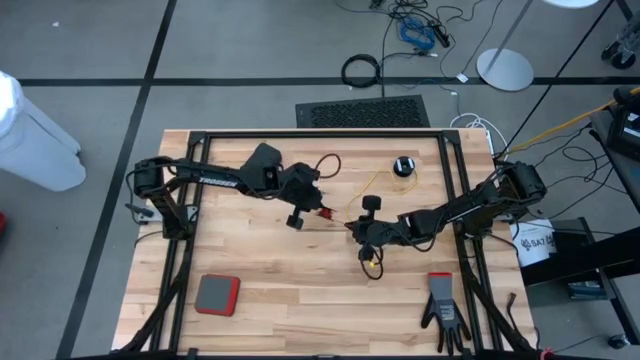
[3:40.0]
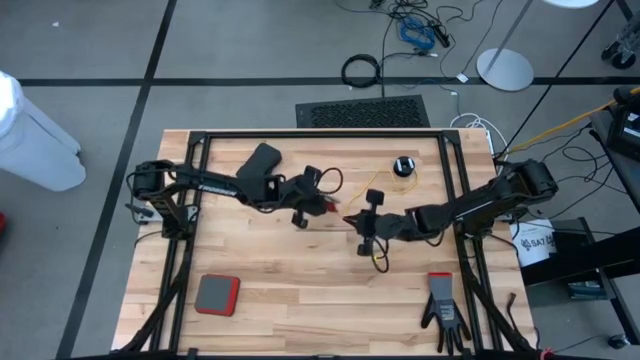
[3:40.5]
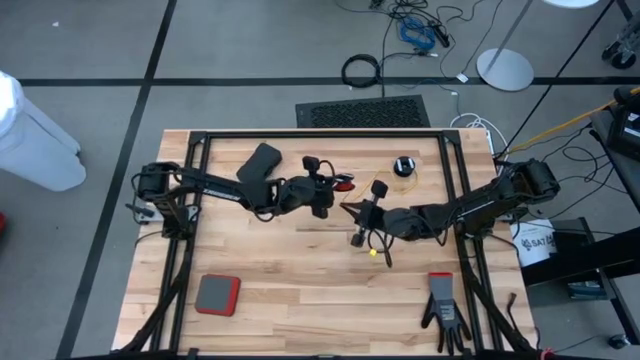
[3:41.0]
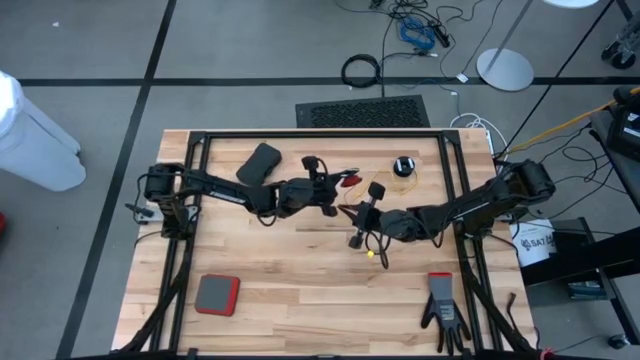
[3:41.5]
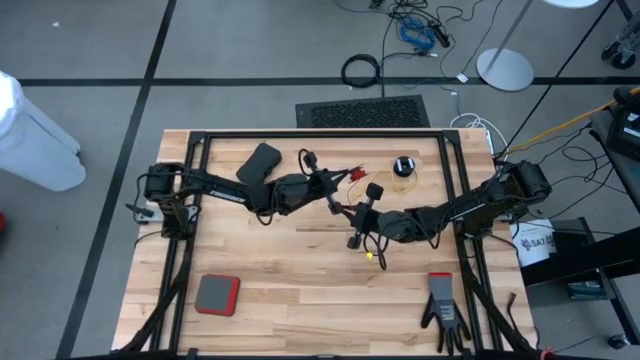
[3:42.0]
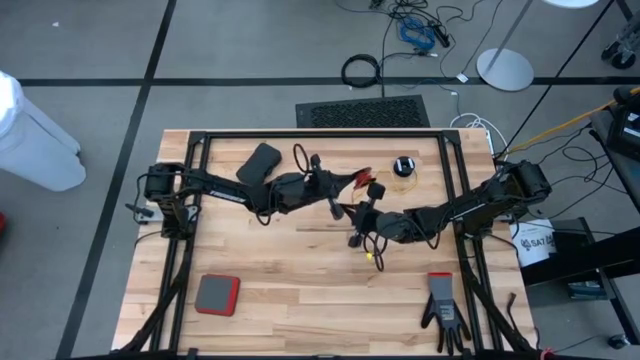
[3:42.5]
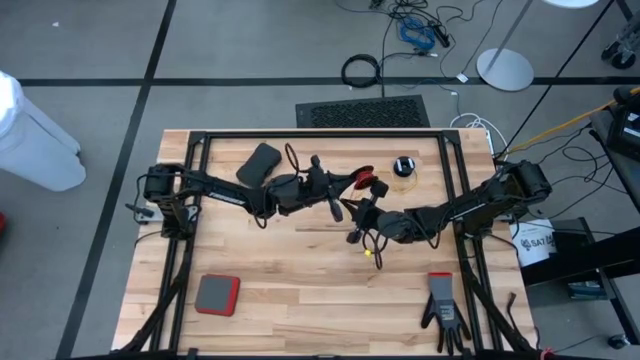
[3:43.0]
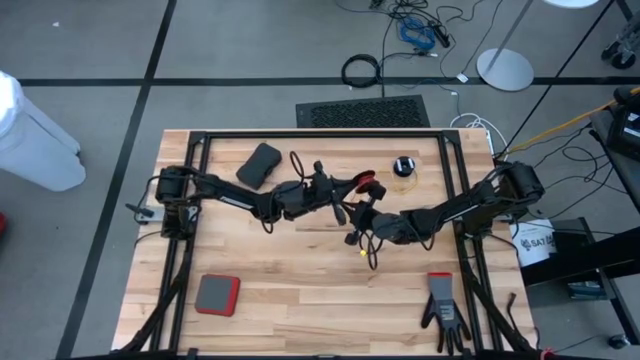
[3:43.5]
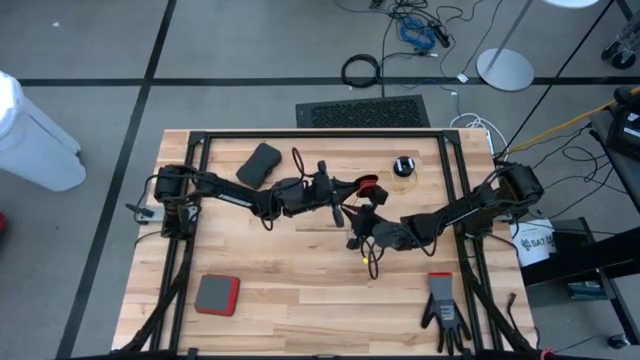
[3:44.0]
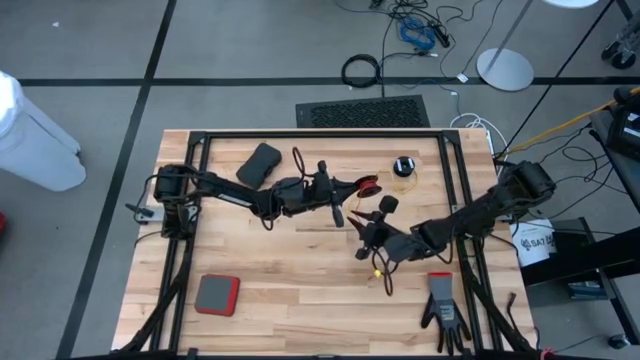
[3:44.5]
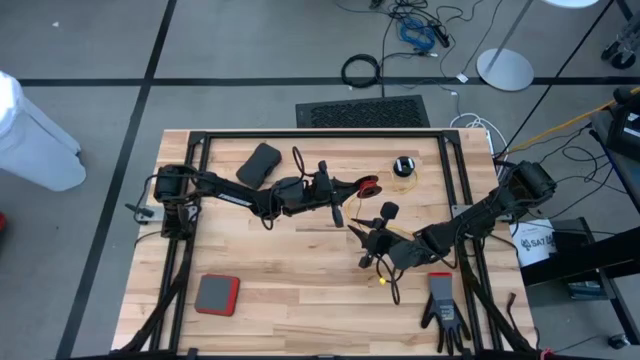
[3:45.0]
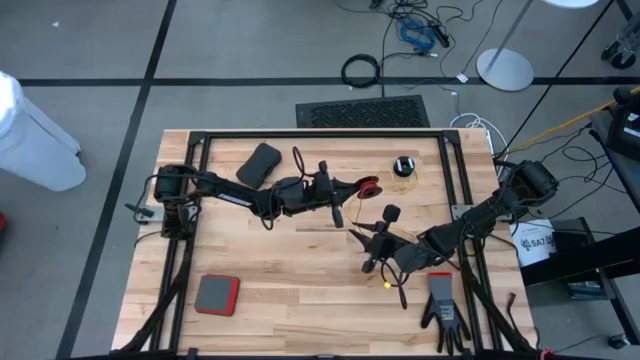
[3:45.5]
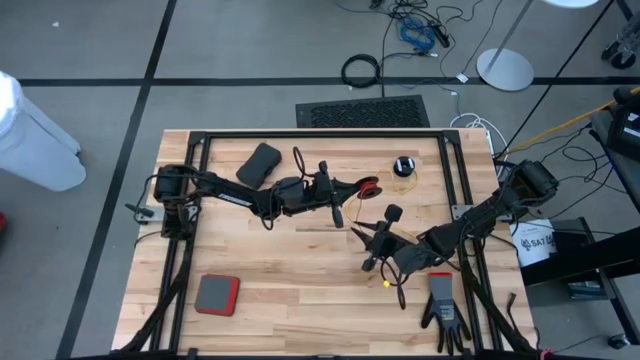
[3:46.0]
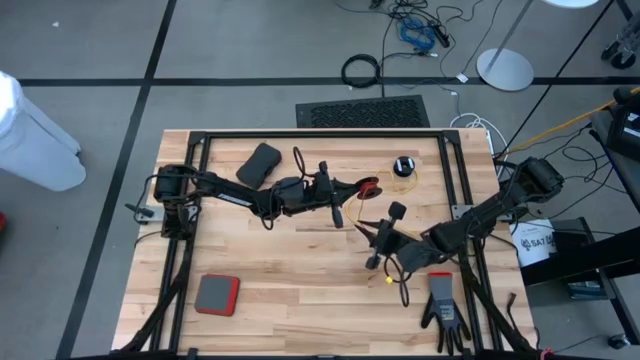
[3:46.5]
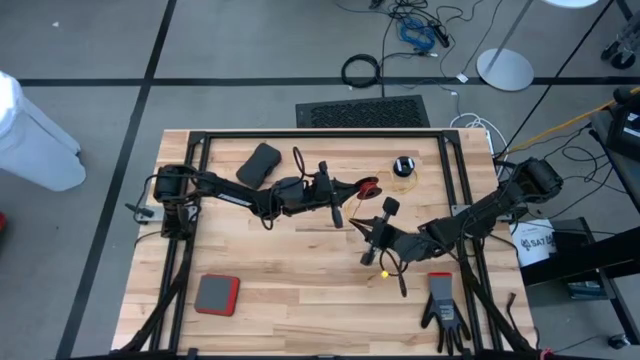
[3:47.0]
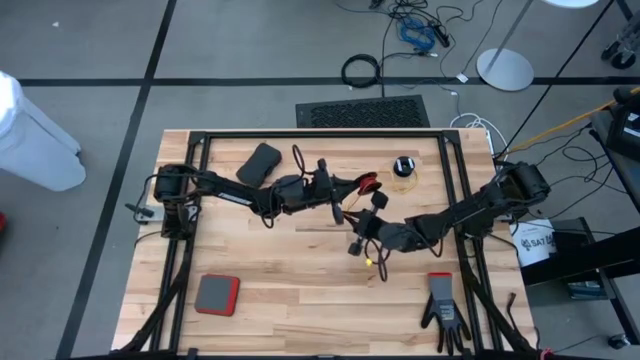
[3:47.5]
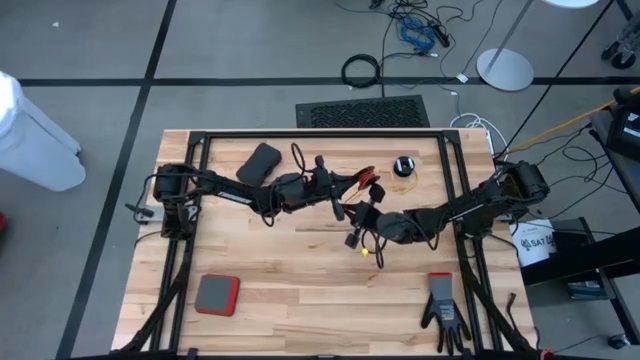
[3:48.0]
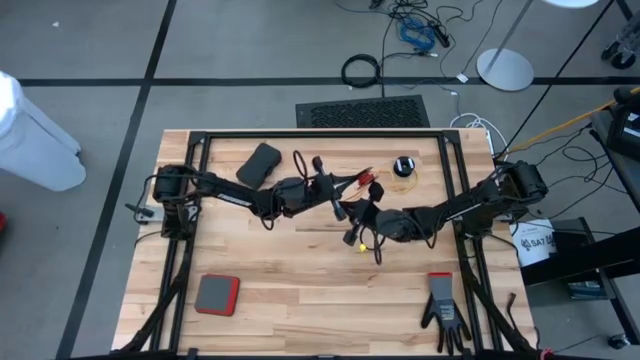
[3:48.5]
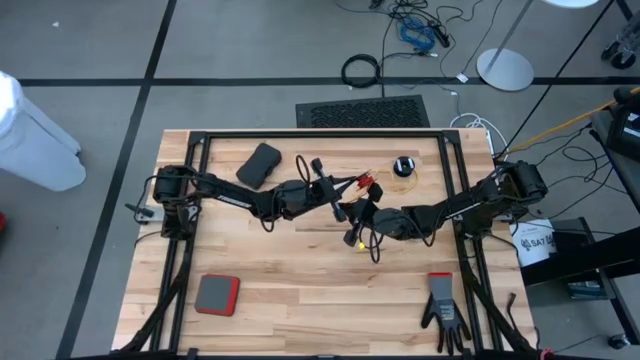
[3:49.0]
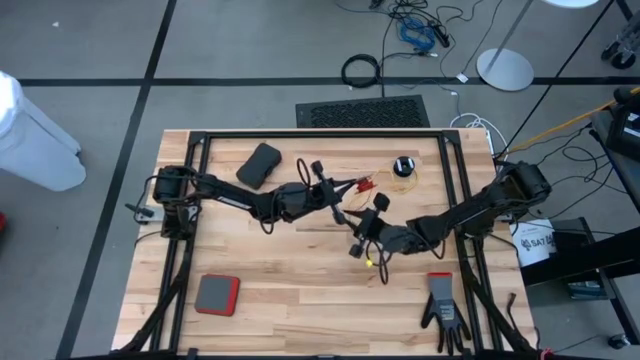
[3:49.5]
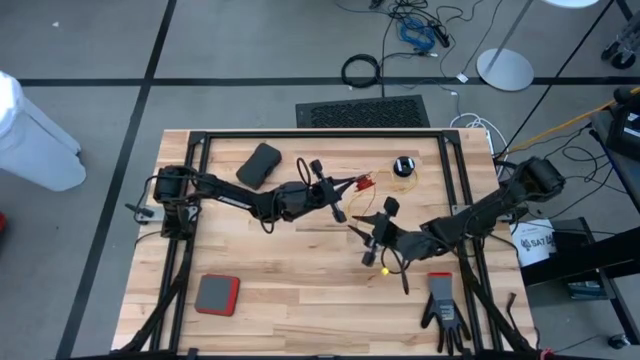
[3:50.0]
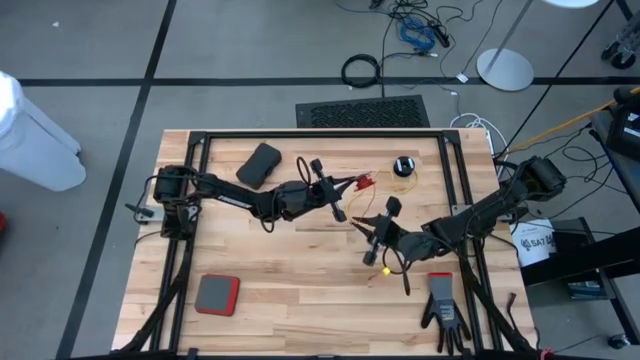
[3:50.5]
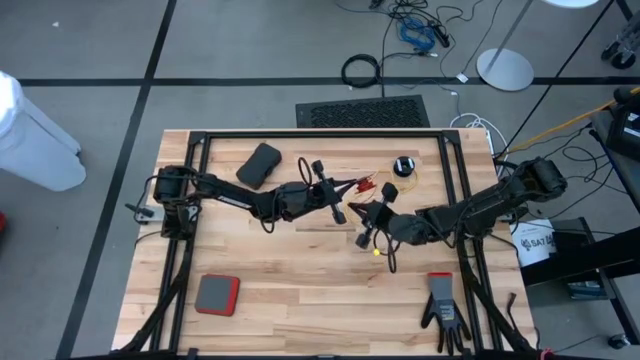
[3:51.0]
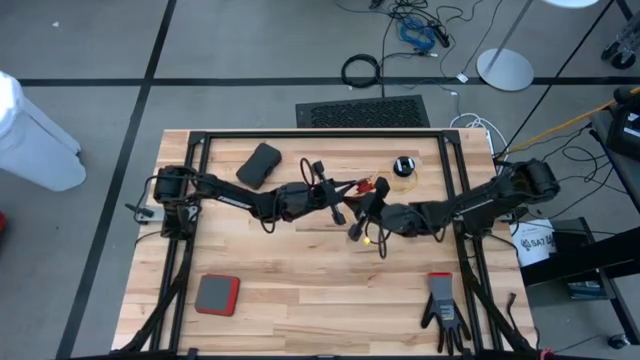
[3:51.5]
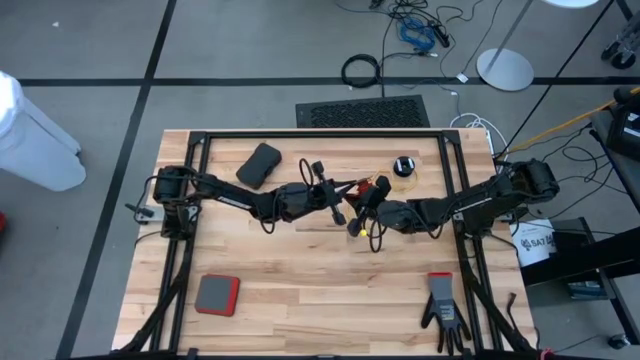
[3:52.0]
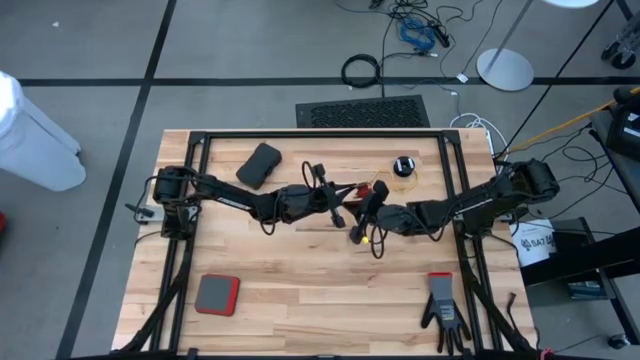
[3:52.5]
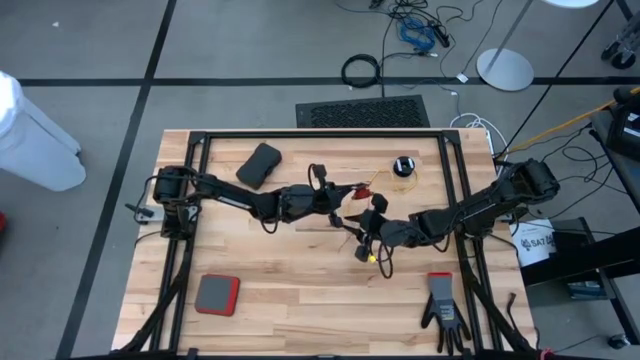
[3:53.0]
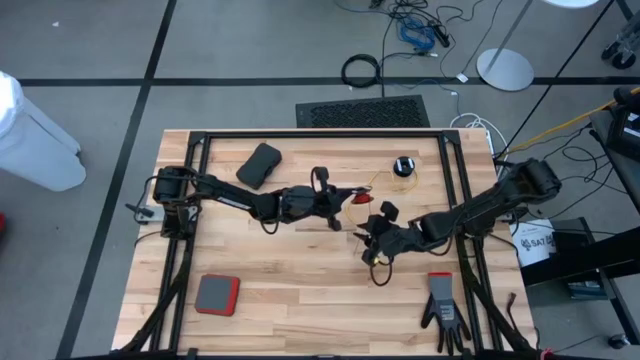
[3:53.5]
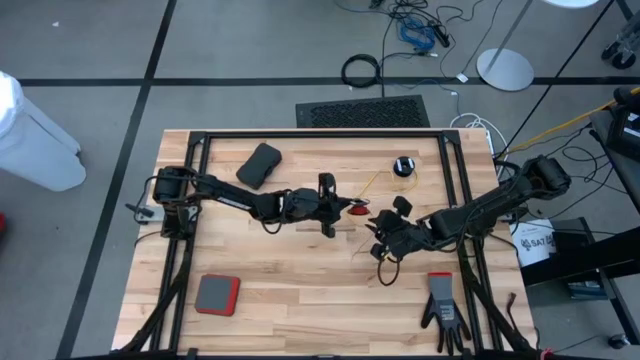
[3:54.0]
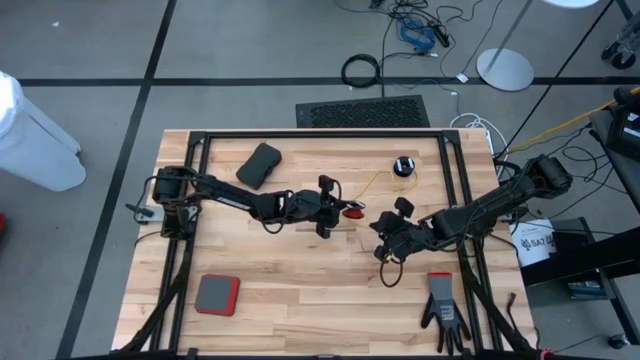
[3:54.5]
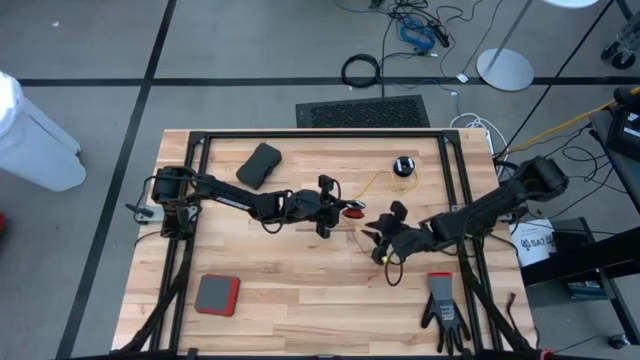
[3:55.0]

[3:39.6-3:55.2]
Task: Coil cords
Coil the red wire on the spool

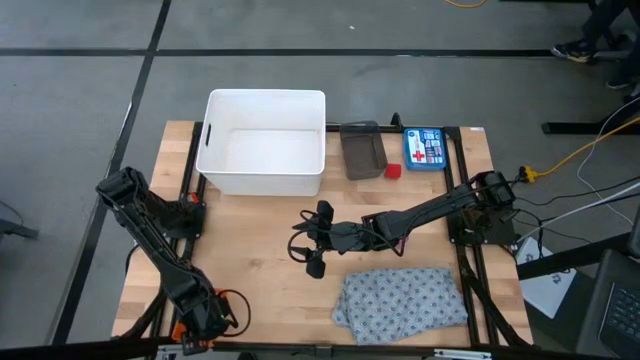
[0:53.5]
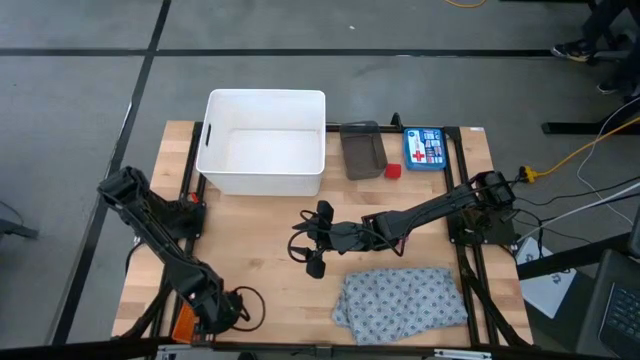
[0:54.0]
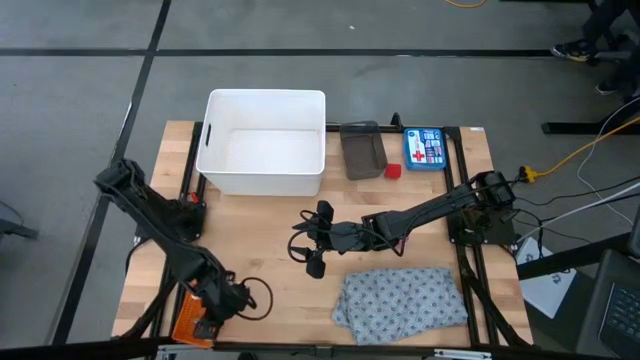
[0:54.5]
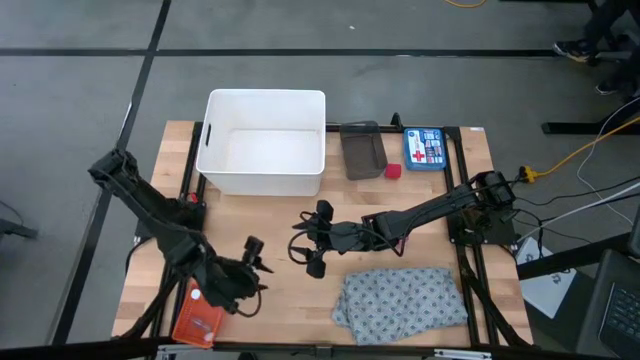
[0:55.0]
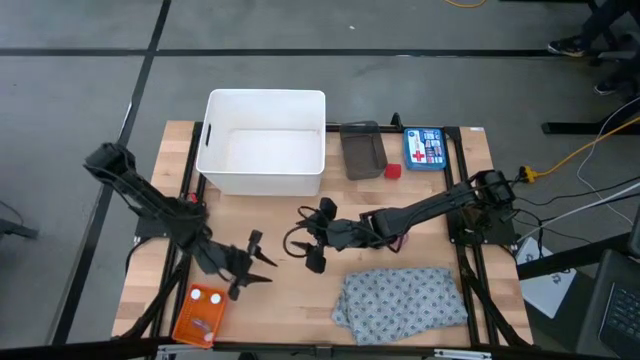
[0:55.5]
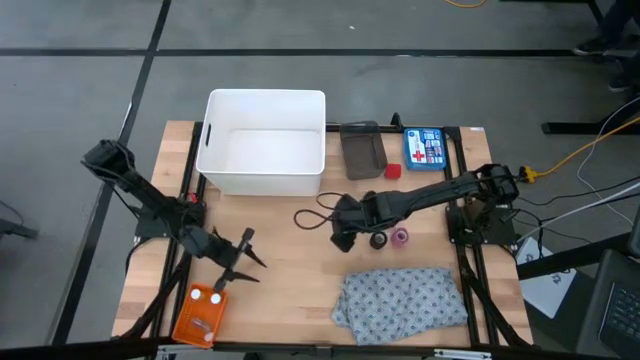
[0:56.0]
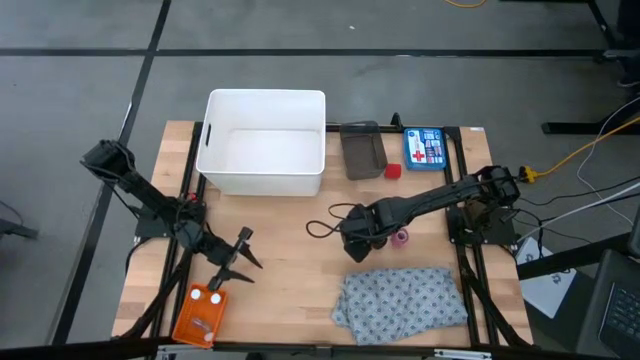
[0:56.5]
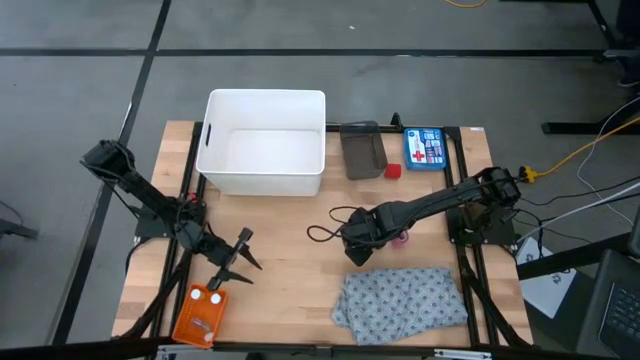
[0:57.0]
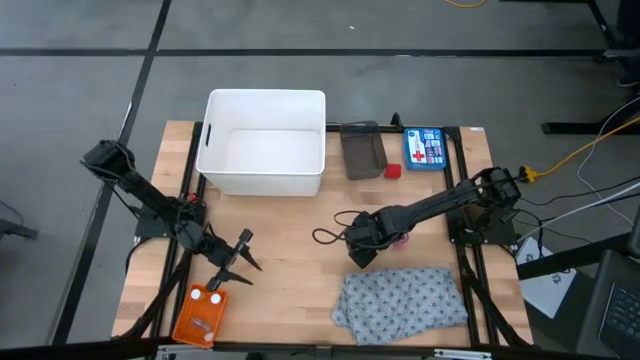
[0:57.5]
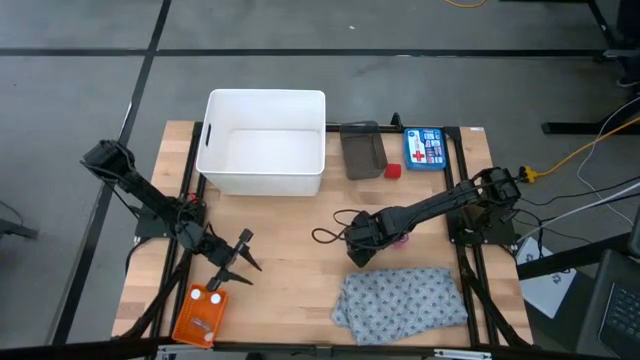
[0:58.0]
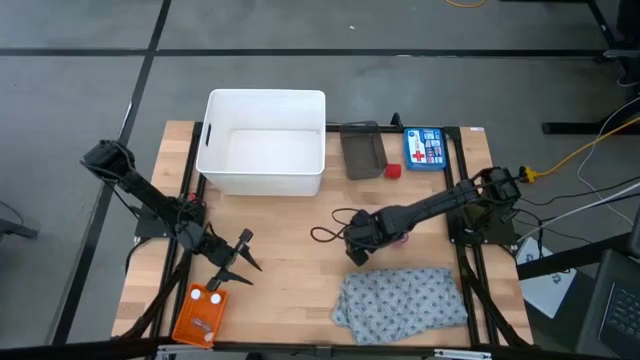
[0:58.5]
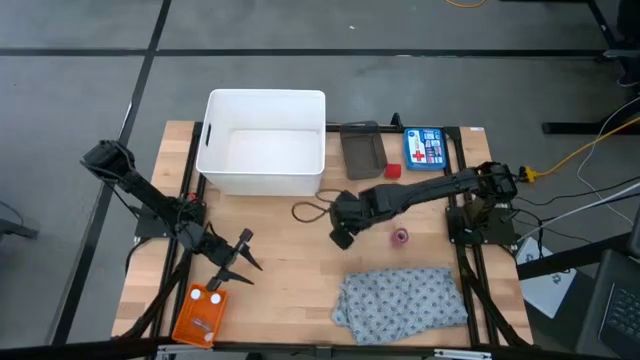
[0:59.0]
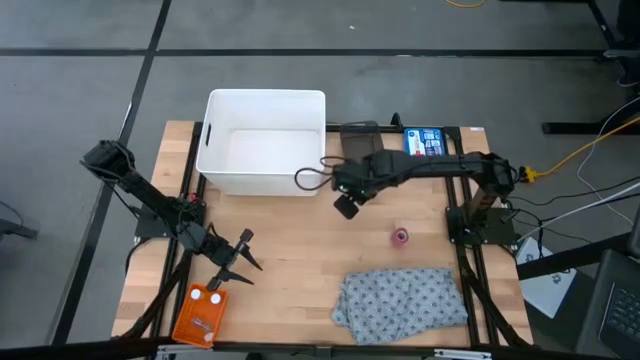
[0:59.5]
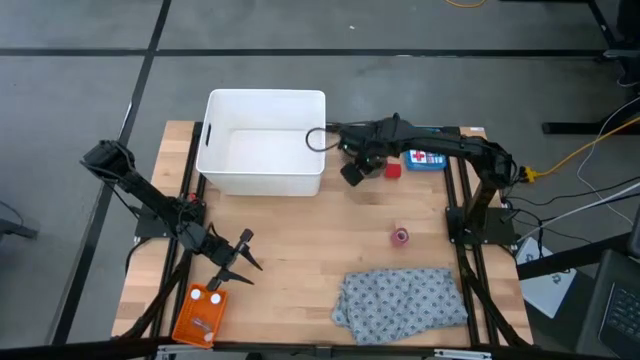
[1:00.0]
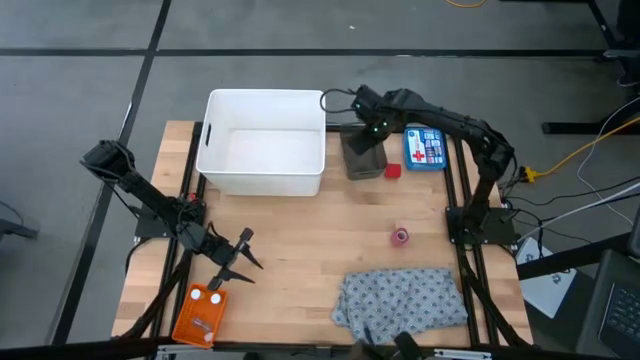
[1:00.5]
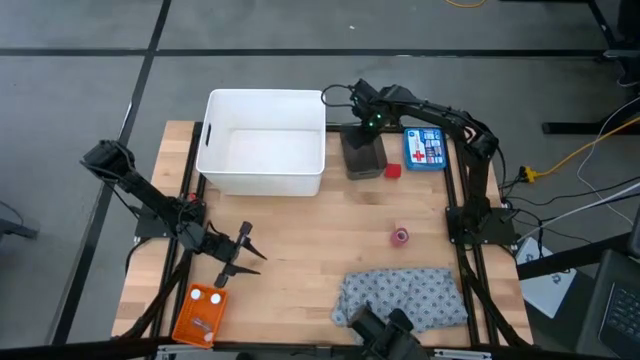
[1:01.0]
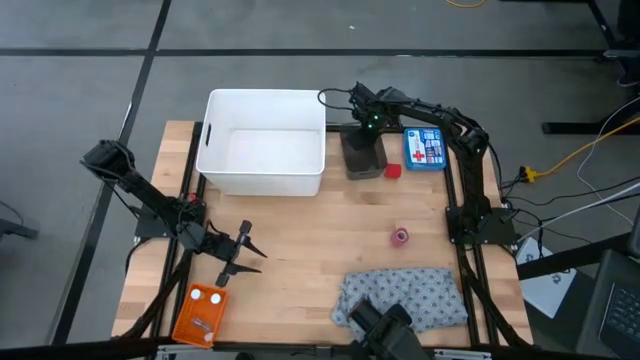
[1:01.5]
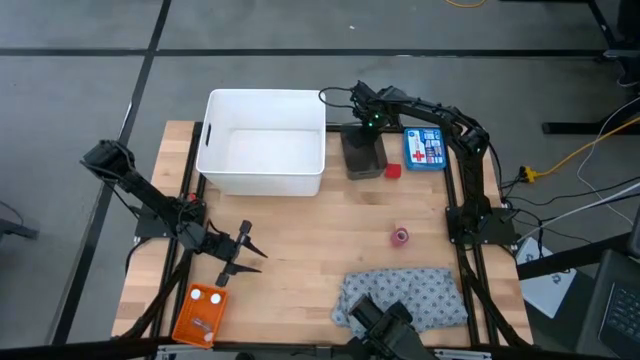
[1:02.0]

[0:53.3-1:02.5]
Task: Pick & place medical supplies in basket/bin
Put the black bandage into the black bin
